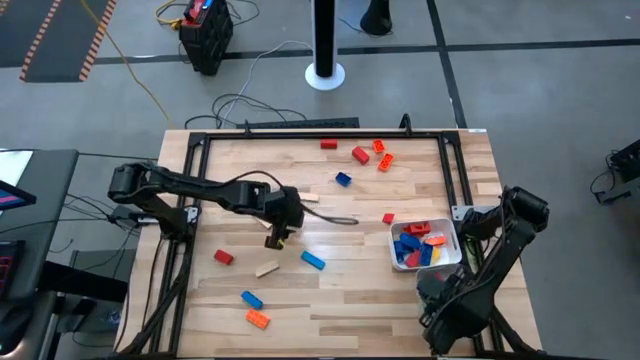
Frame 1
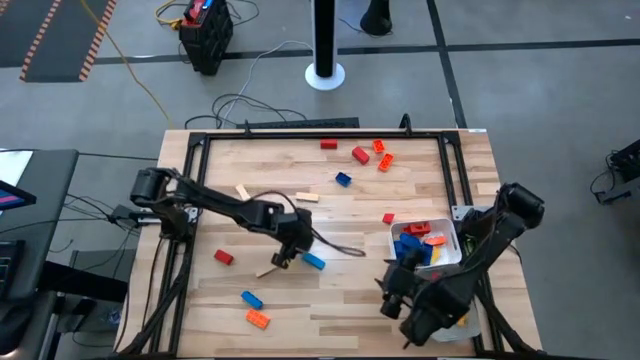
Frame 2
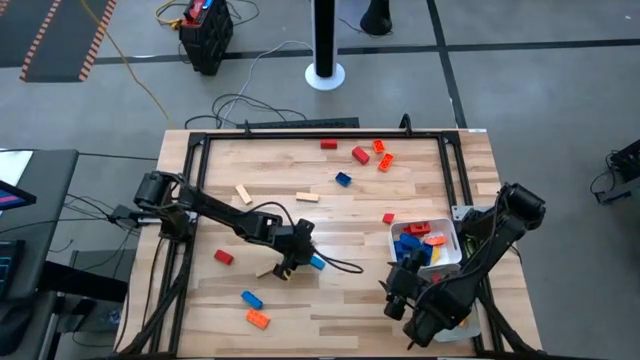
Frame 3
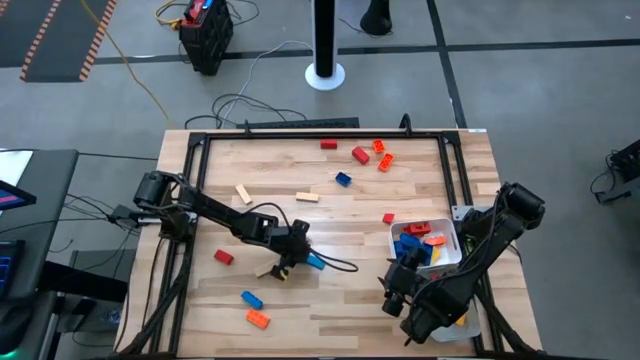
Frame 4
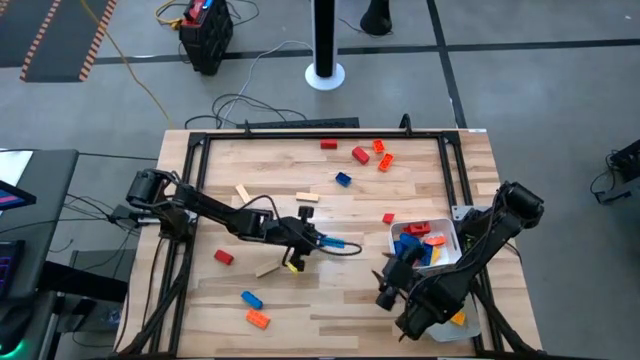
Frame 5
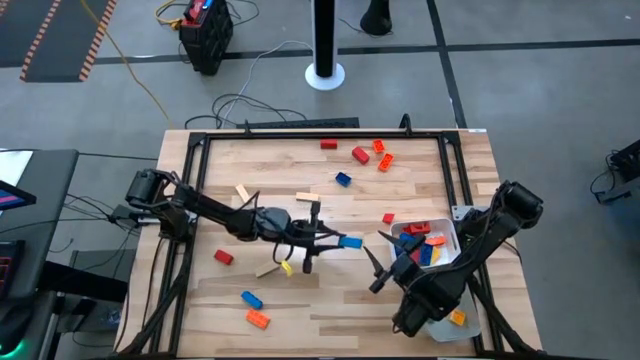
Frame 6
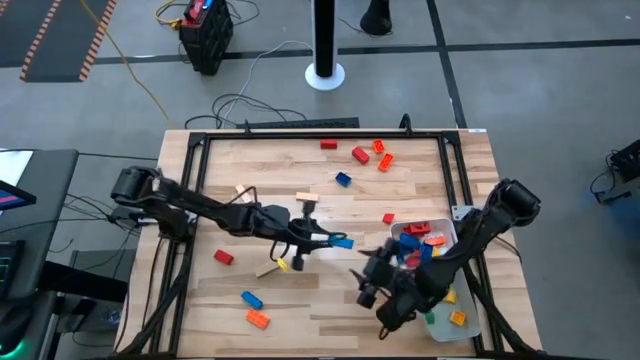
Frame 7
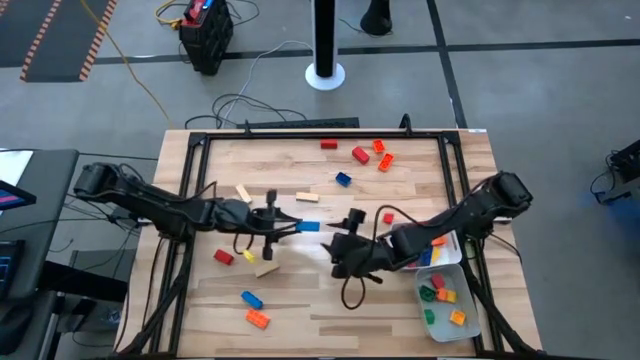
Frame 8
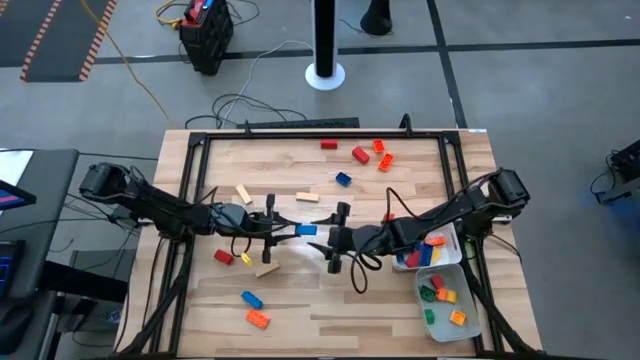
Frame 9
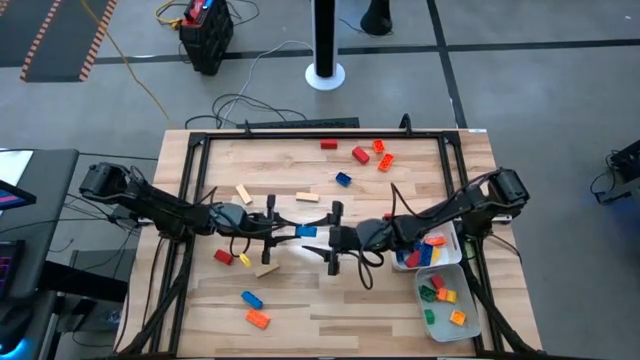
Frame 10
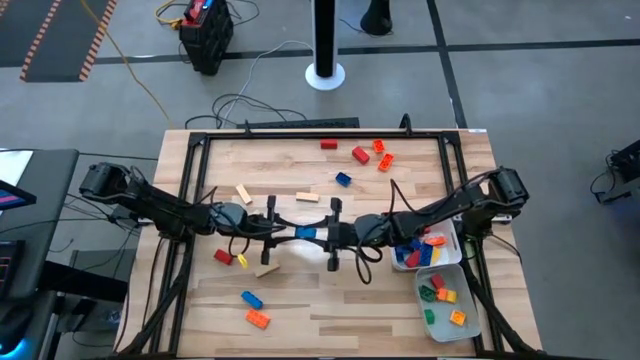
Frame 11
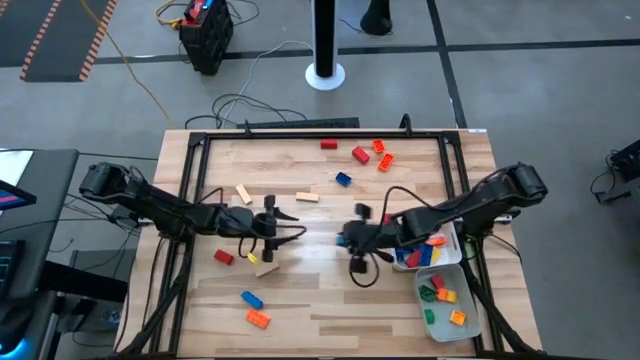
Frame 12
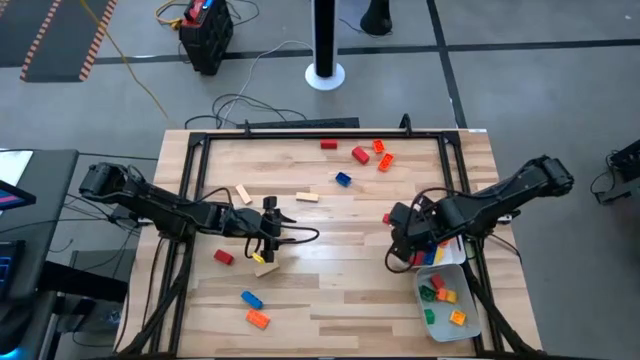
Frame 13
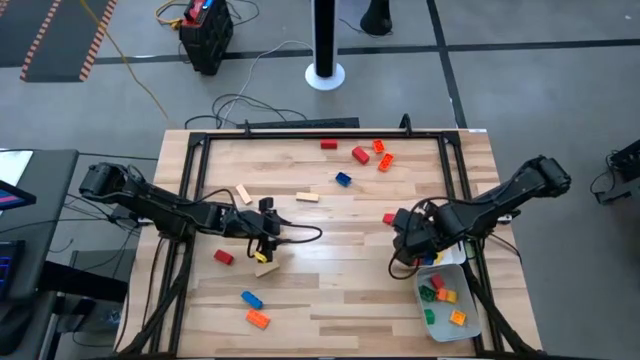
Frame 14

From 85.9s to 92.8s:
Task: Sort blocks by size
Put the blue block into the white bin

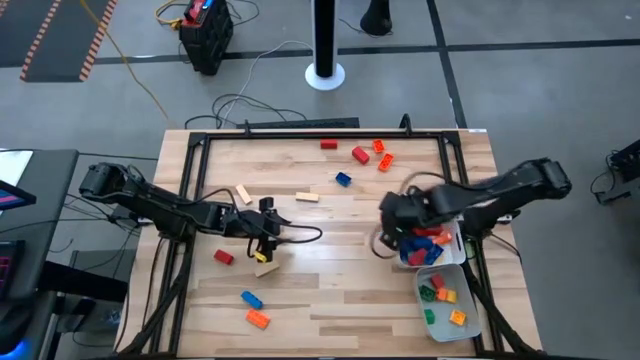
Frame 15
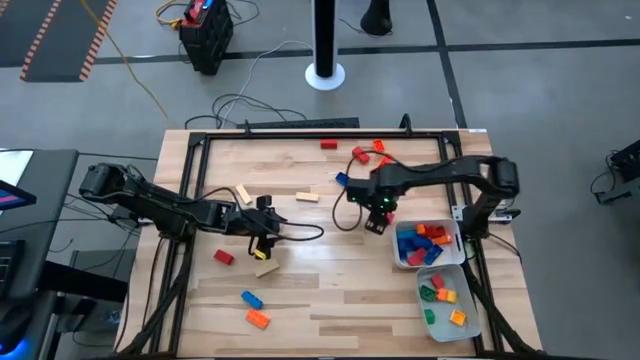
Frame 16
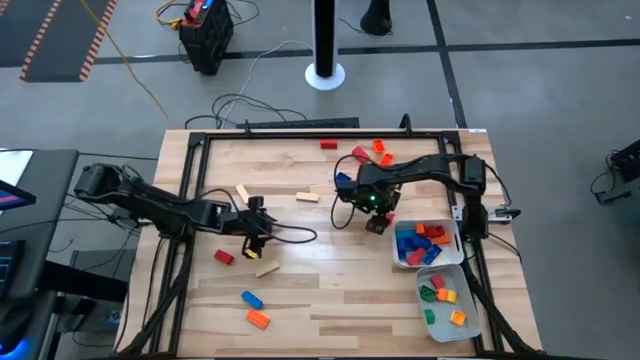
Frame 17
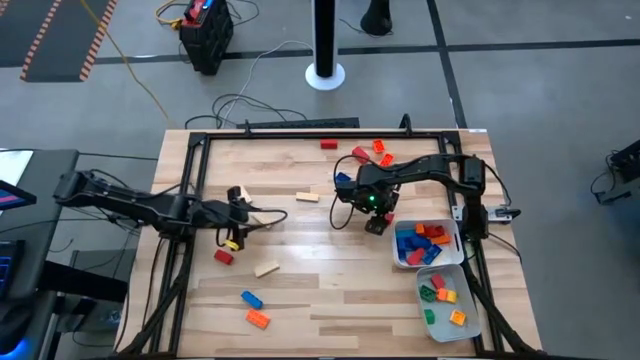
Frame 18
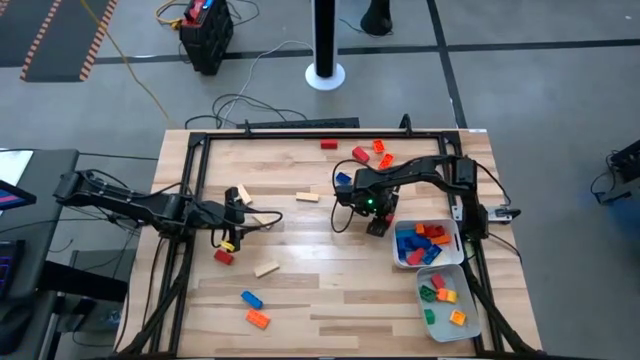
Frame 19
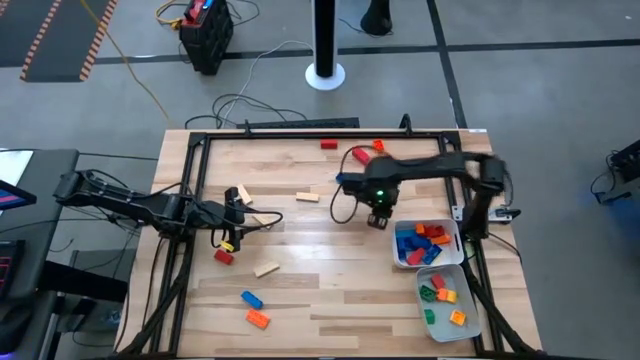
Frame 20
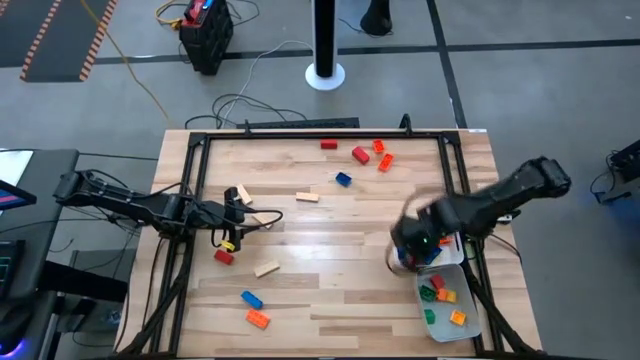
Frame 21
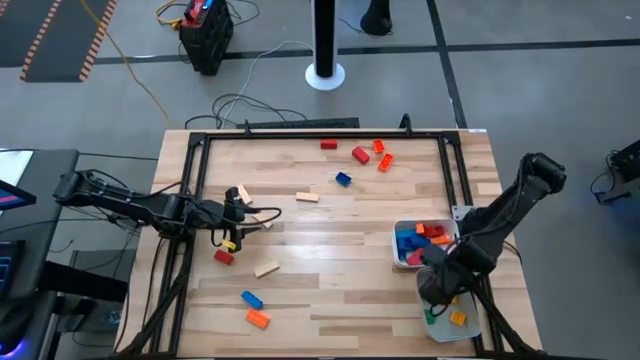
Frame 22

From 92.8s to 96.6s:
Put the red block into the grey bin

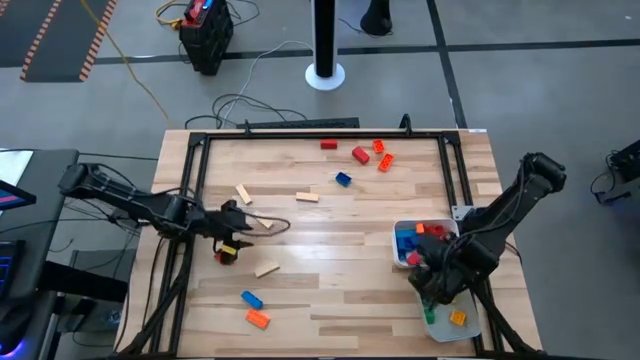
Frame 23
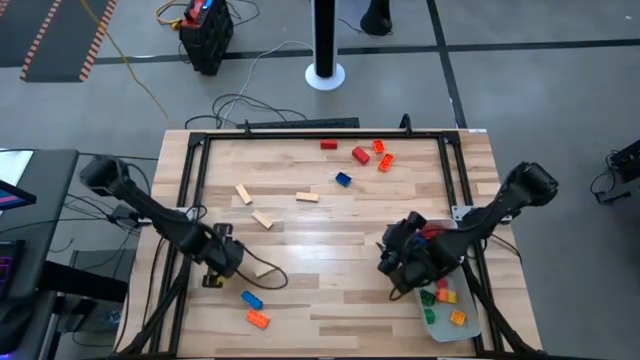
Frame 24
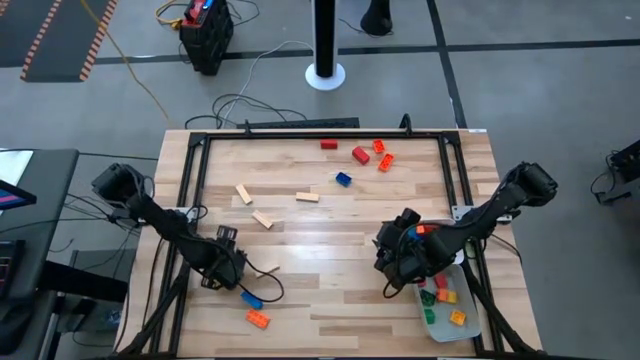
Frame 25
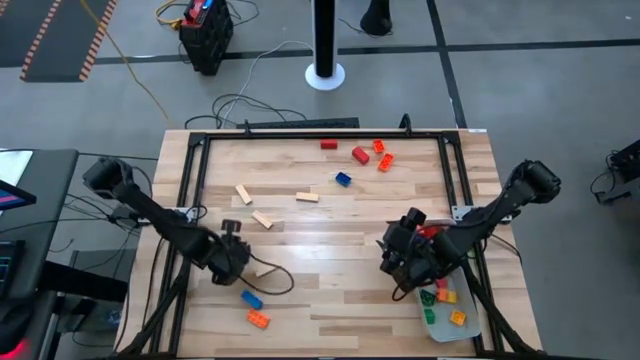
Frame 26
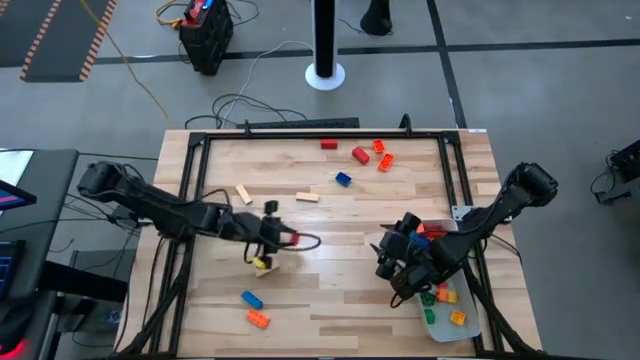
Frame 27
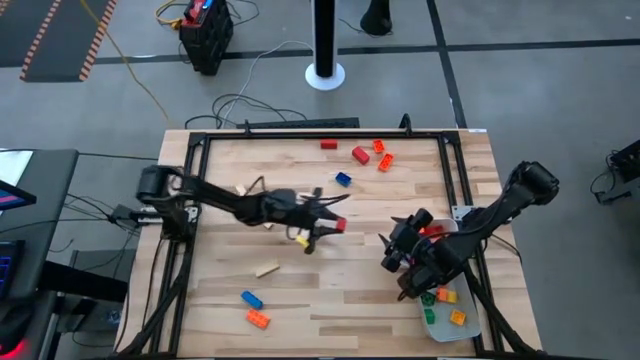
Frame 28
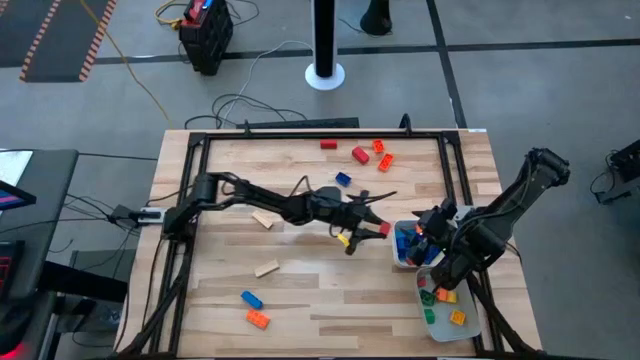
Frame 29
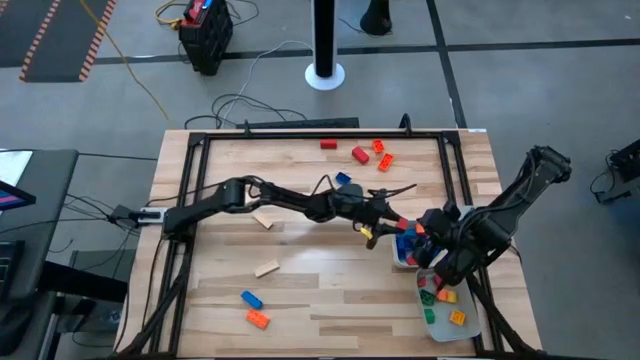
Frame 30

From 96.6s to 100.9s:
Put the red block into the white bin

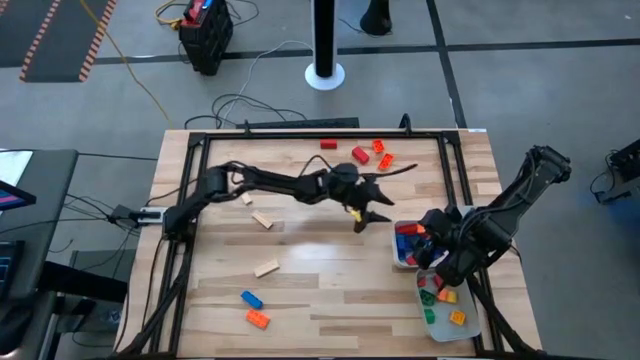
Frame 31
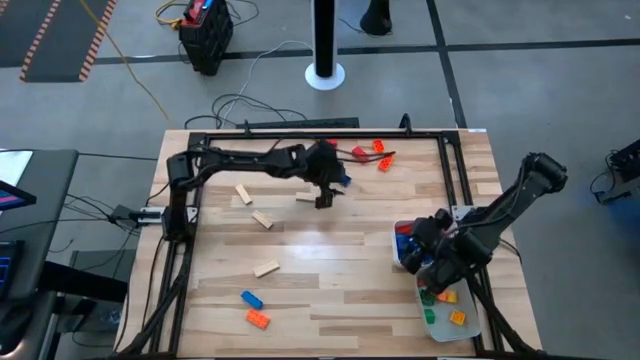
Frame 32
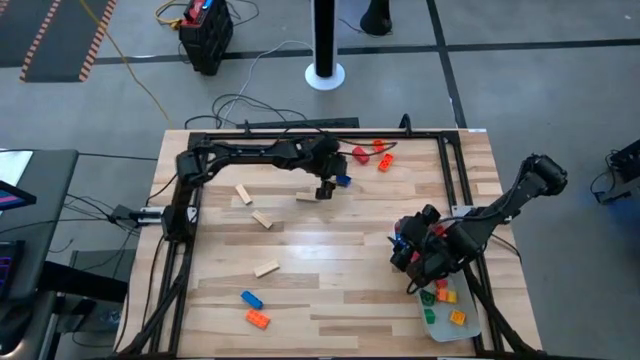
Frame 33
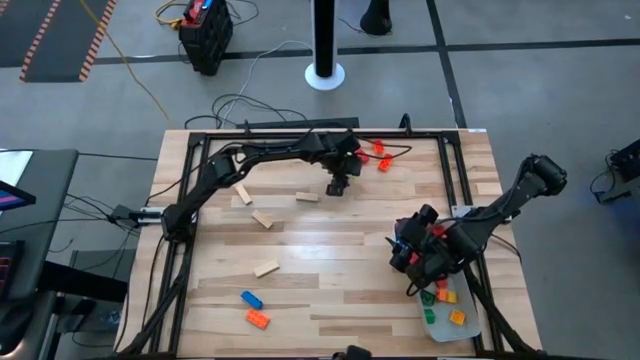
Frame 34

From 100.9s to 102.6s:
Put the 4 stud blue game piece into the grey bin

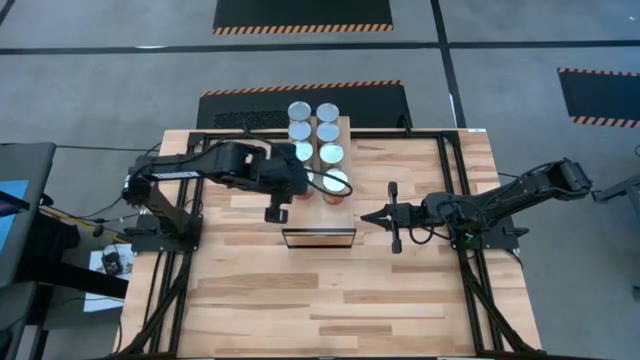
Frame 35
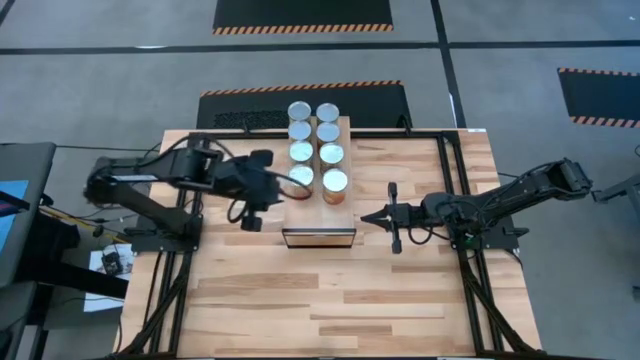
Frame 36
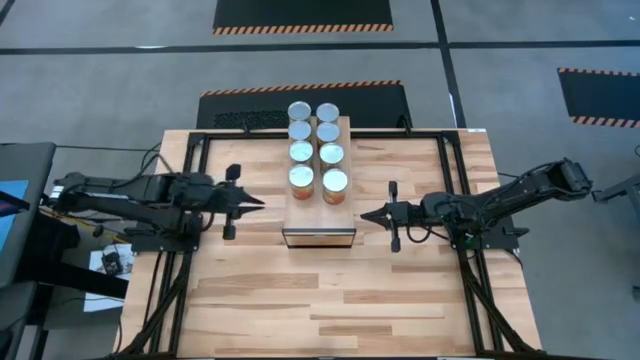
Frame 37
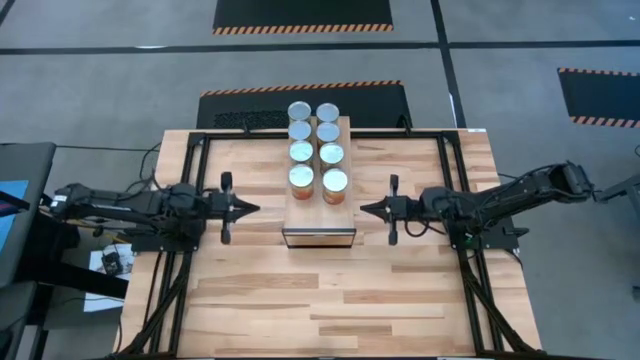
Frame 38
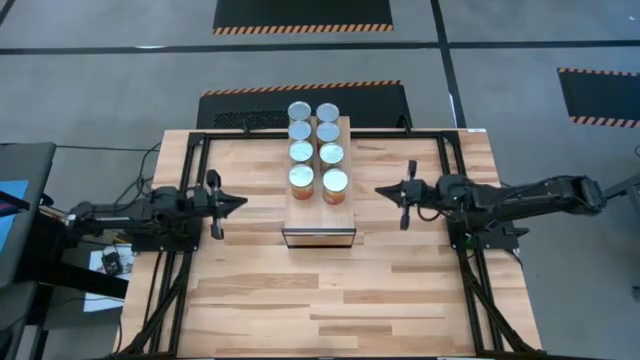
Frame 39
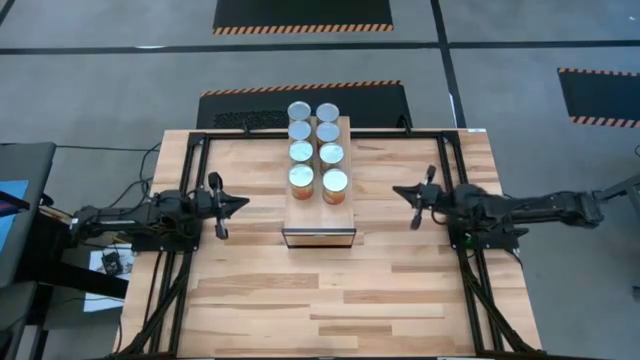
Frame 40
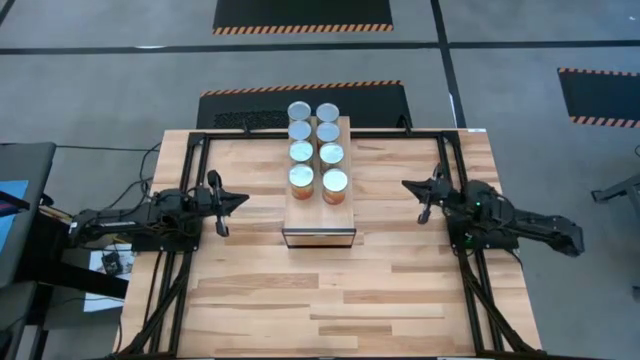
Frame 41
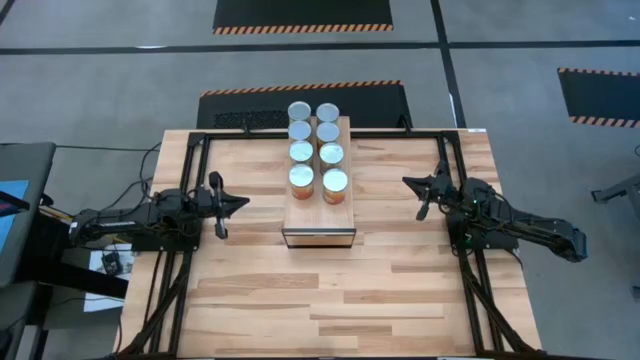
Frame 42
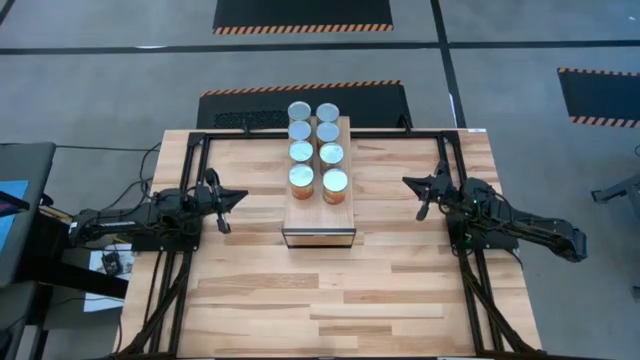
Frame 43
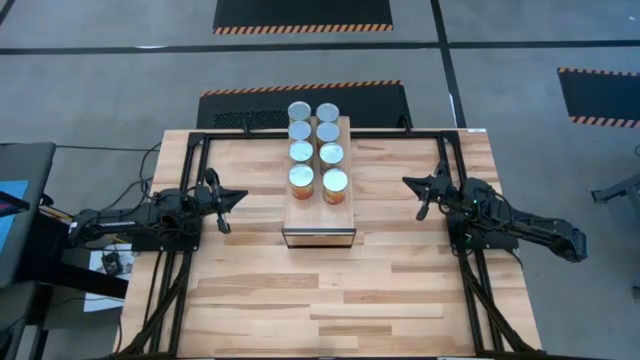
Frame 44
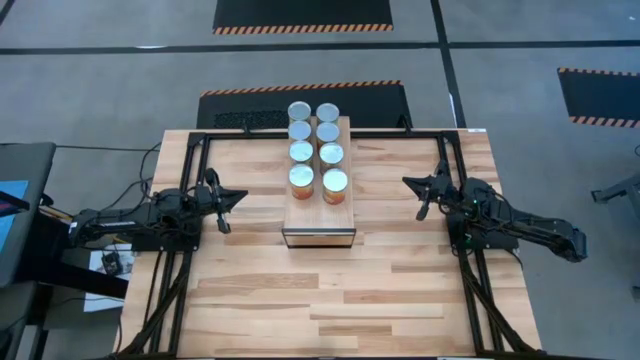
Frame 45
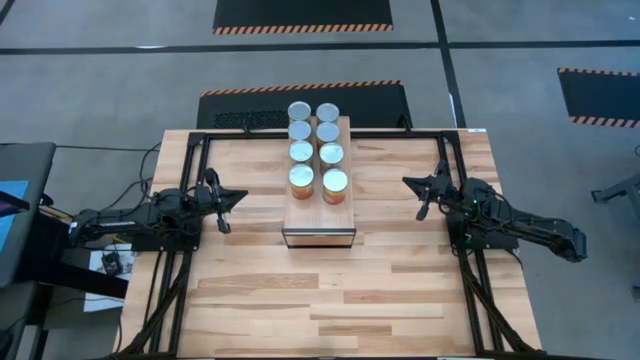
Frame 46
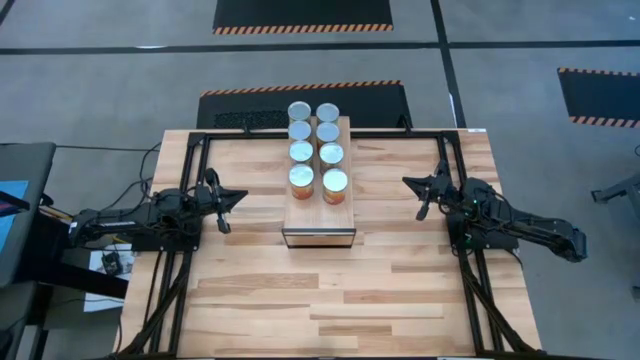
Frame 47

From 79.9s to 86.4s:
Task: Pick and place cans onto a shelf
Return to Home Position
